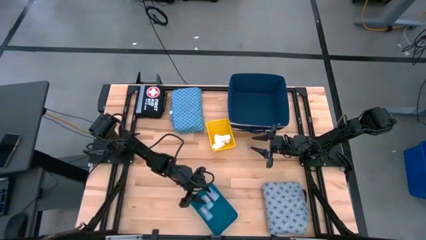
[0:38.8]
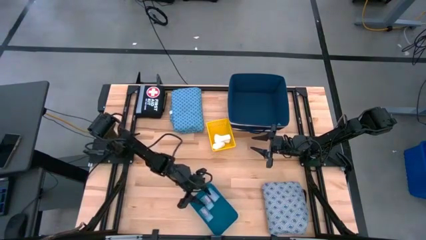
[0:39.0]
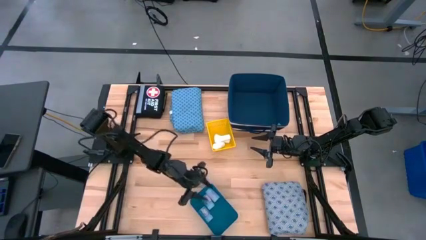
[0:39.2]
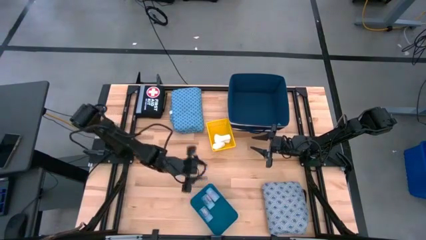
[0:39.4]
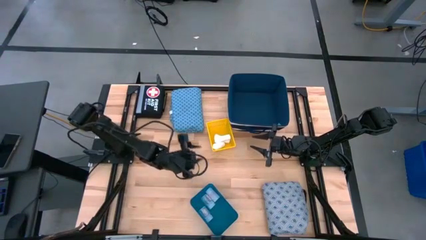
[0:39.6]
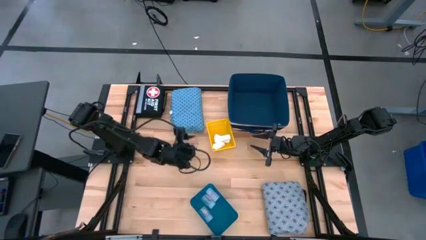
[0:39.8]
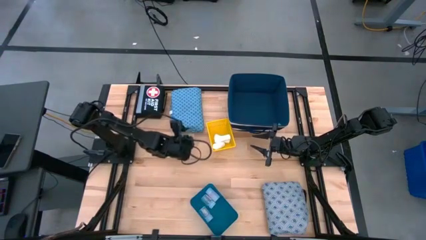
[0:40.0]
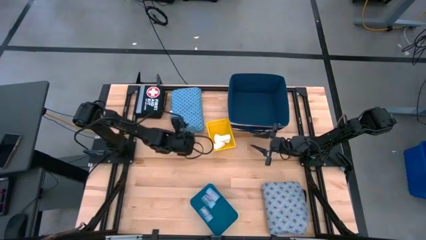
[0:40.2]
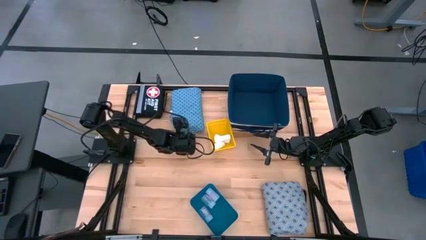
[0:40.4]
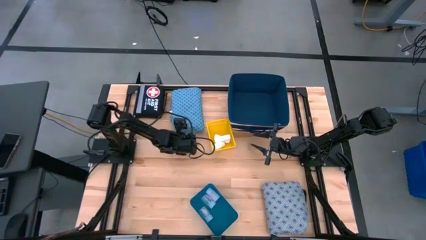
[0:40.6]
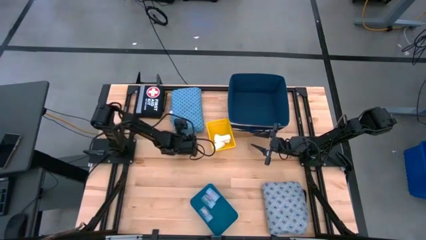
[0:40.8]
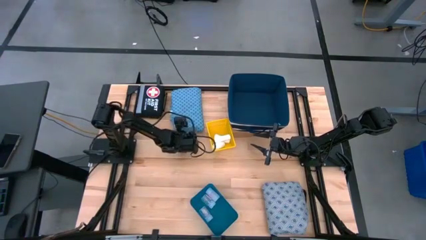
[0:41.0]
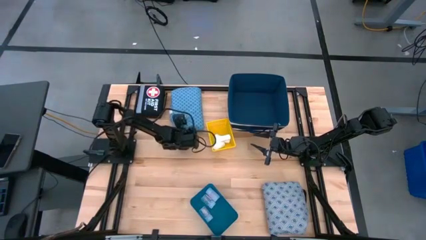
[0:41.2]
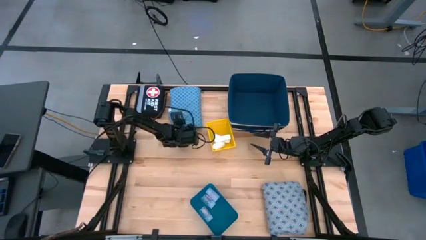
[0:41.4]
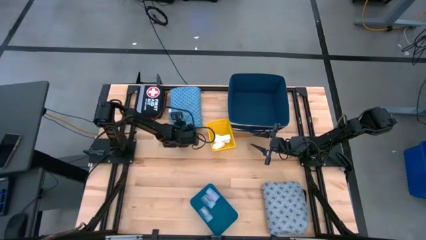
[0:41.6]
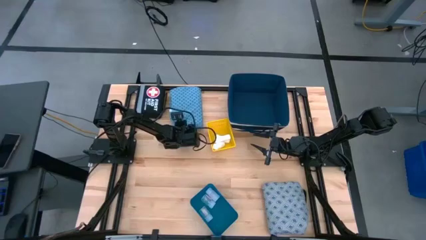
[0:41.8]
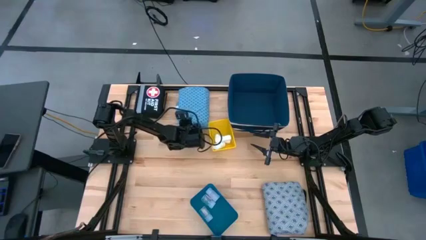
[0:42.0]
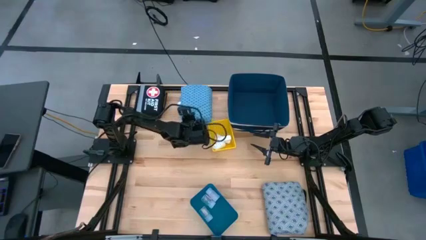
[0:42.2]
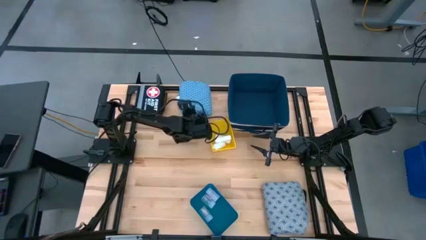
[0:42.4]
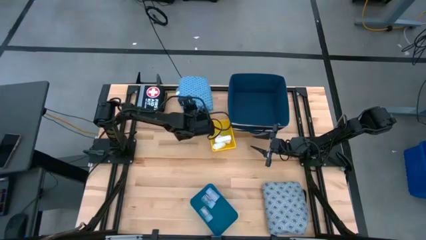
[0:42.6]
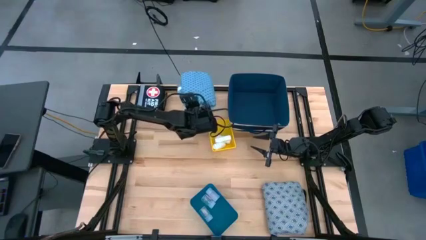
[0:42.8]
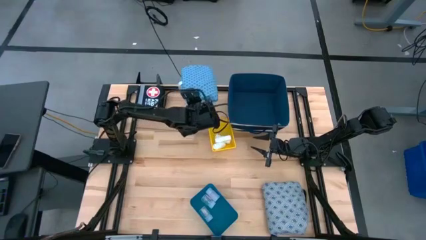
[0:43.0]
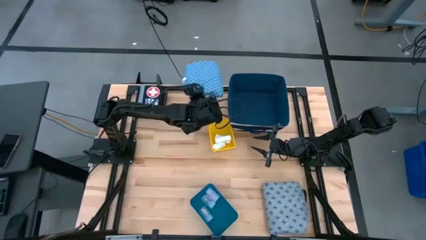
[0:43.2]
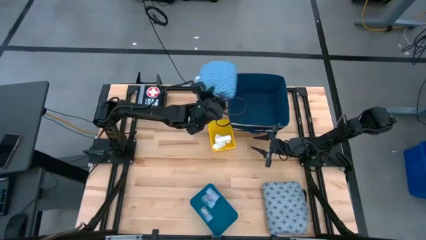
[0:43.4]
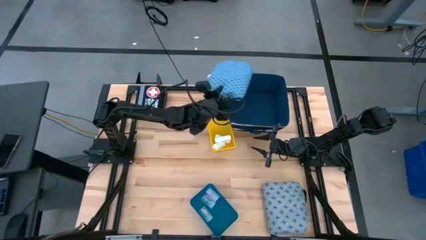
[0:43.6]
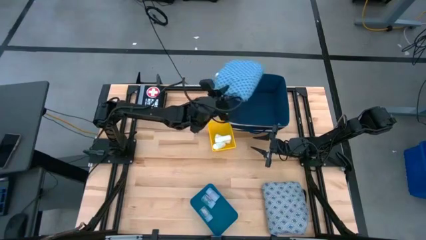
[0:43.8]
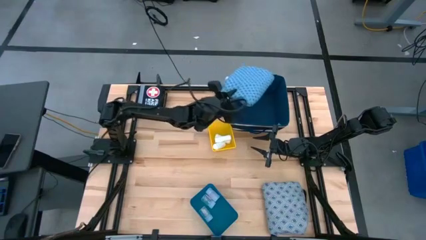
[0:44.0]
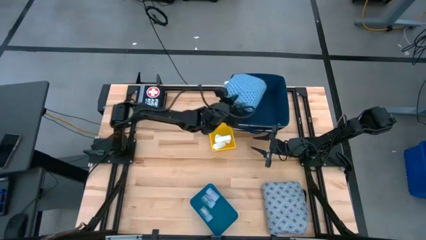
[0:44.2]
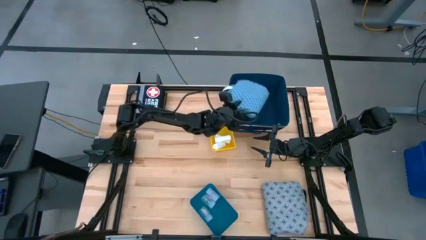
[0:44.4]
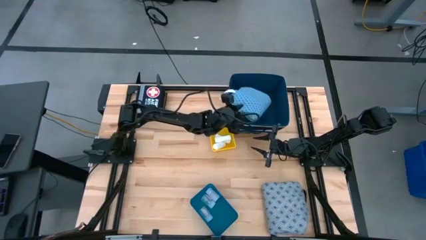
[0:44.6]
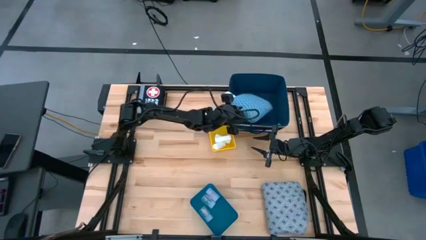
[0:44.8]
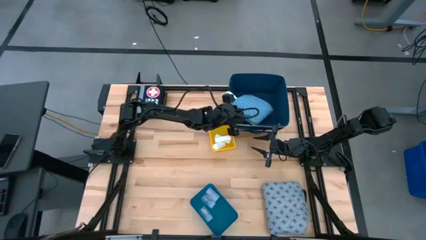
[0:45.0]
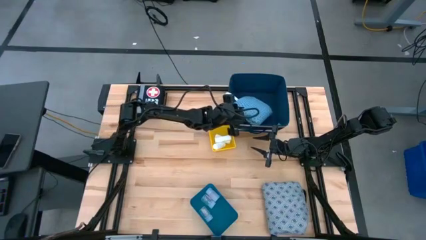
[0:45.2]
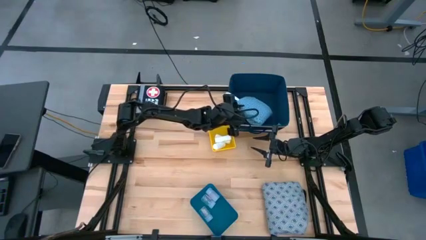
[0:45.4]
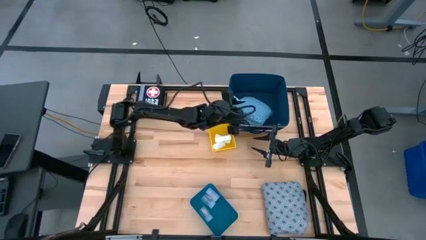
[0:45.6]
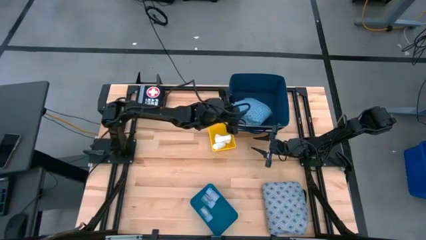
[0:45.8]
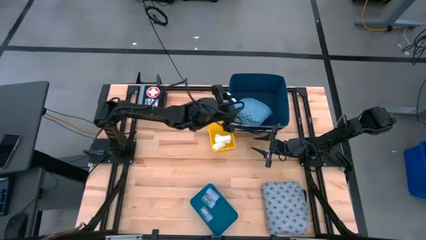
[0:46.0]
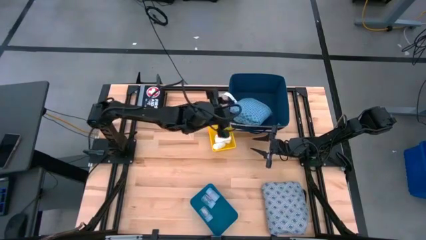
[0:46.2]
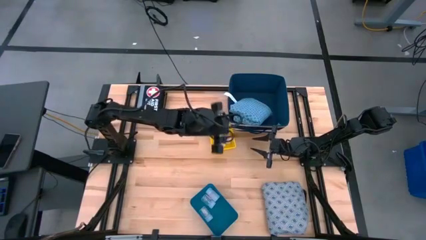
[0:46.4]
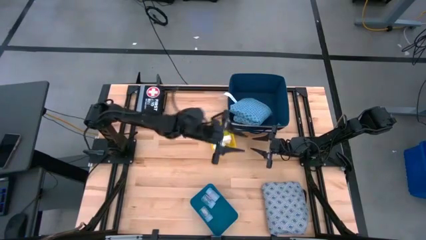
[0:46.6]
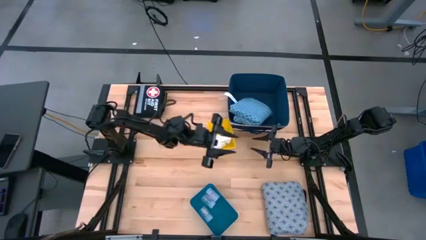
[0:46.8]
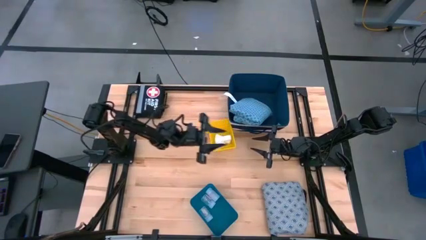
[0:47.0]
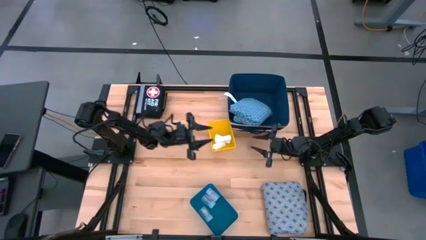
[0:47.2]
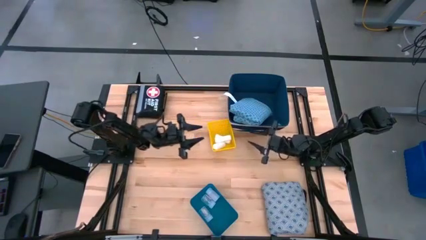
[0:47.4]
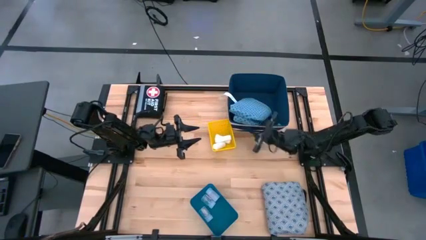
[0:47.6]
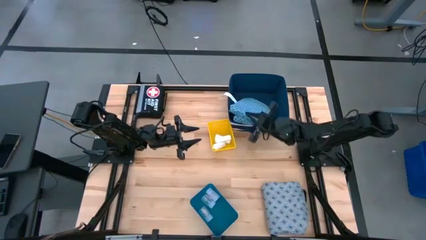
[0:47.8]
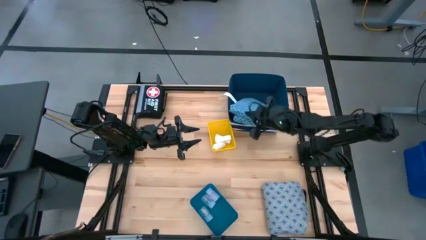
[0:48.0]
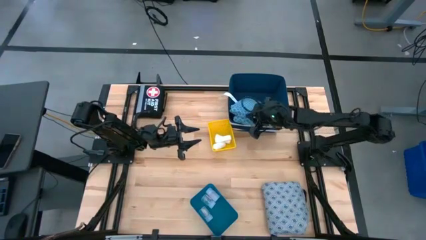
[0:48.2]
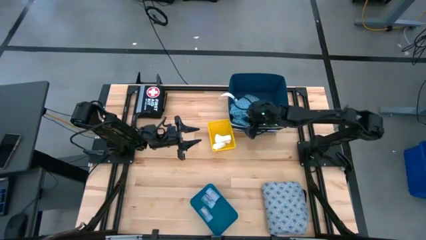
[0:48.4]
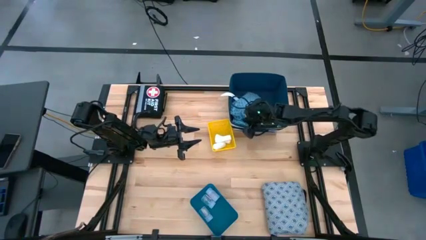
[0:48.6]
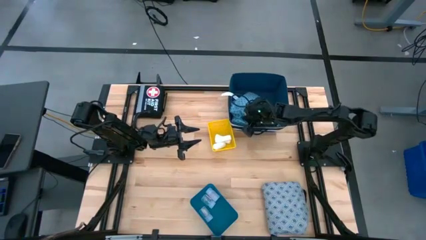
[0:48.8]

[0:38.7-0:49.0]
Task: Pick & place medical supplies in basket/bin
Put the blue patient gown into the blue and white bin

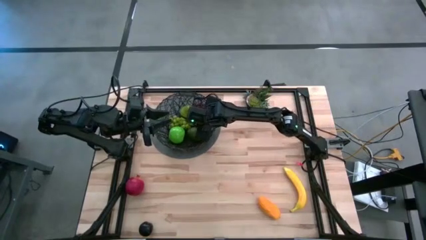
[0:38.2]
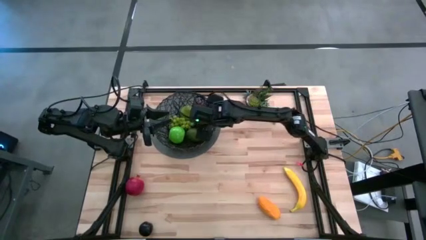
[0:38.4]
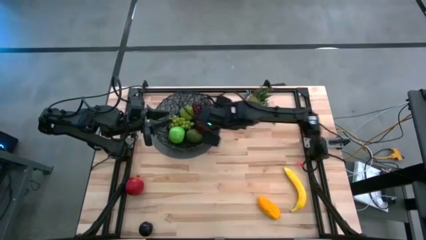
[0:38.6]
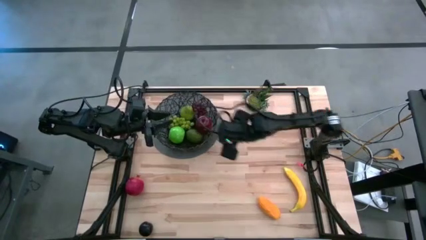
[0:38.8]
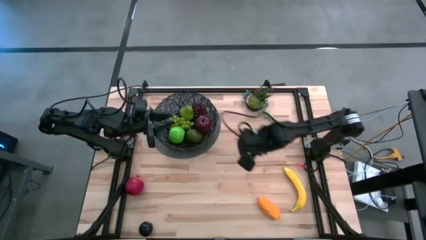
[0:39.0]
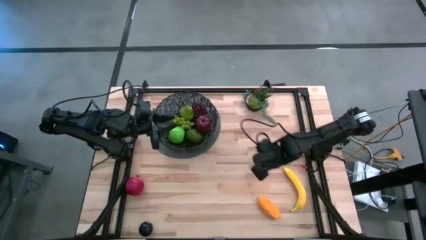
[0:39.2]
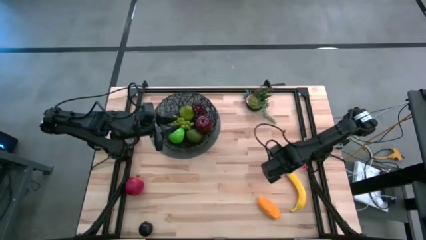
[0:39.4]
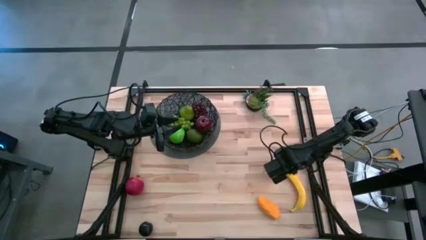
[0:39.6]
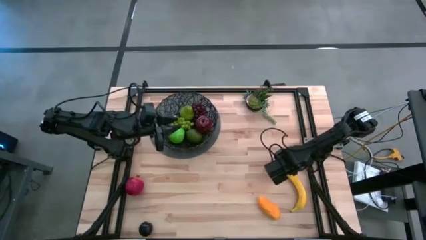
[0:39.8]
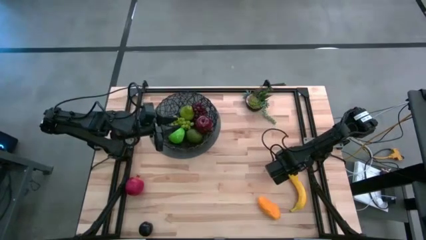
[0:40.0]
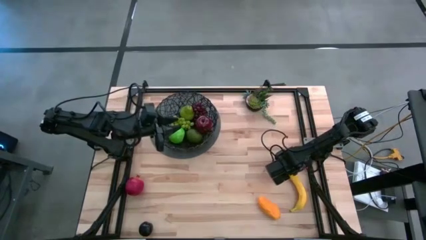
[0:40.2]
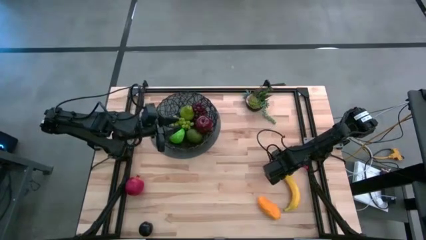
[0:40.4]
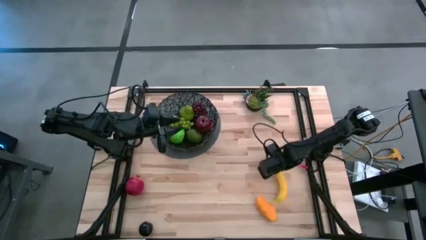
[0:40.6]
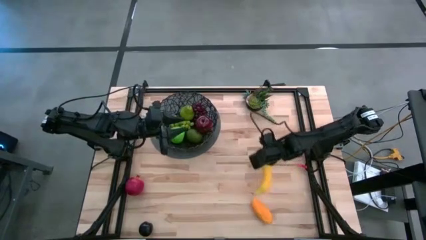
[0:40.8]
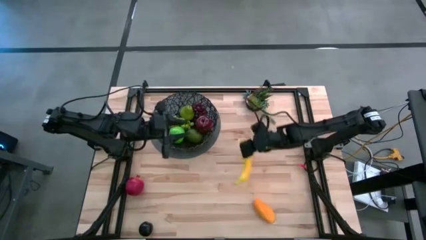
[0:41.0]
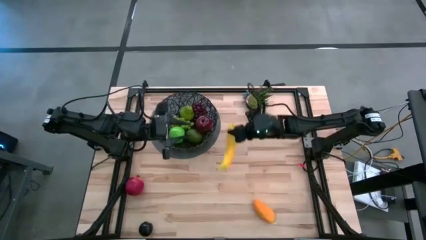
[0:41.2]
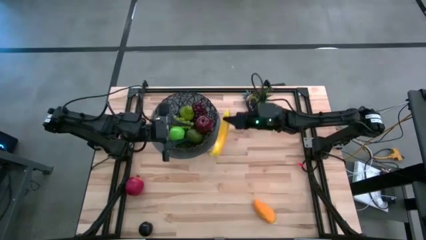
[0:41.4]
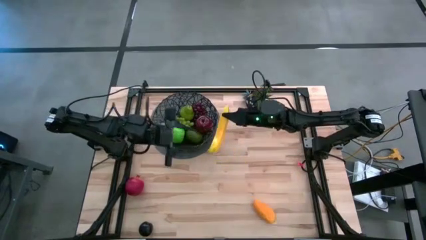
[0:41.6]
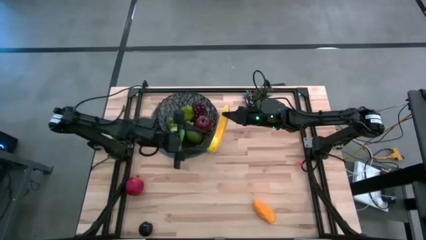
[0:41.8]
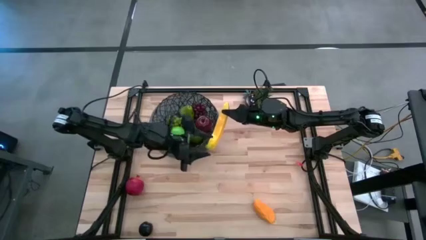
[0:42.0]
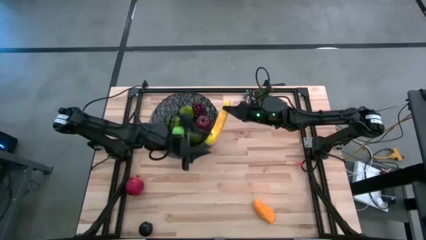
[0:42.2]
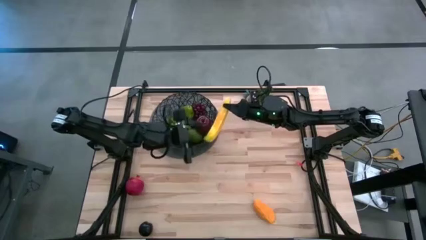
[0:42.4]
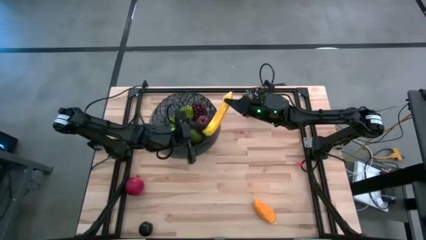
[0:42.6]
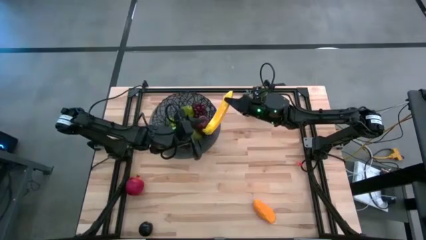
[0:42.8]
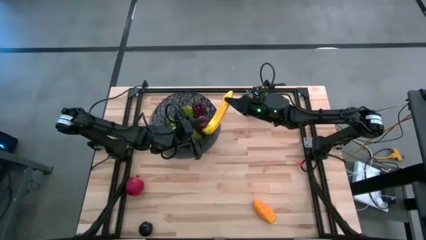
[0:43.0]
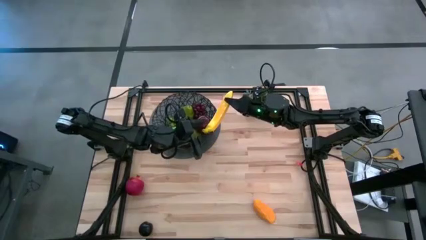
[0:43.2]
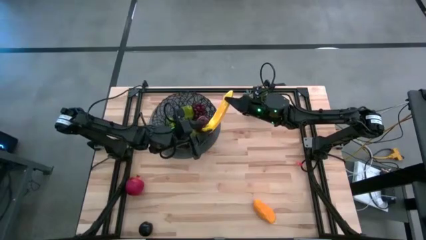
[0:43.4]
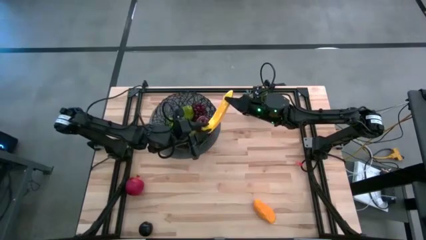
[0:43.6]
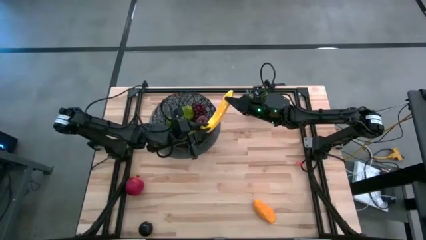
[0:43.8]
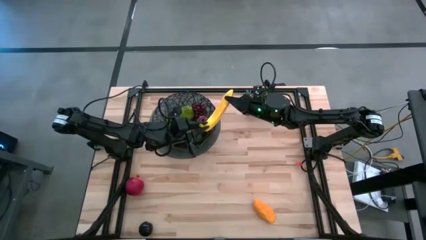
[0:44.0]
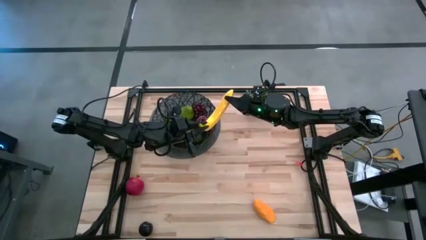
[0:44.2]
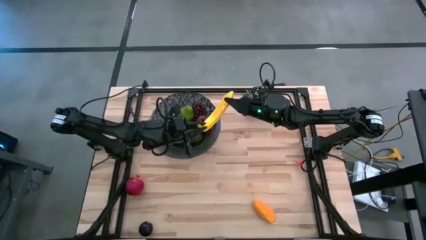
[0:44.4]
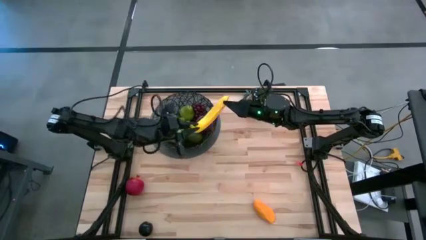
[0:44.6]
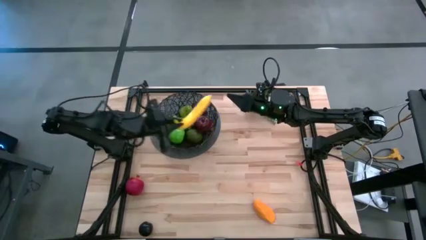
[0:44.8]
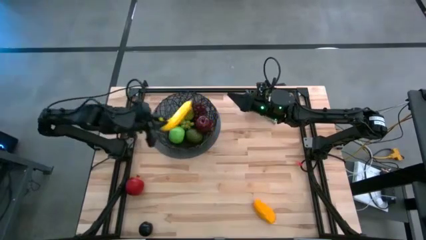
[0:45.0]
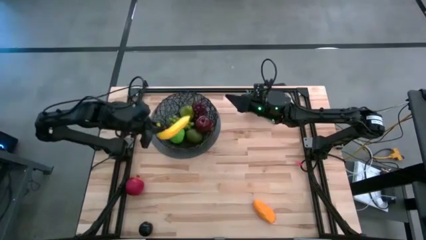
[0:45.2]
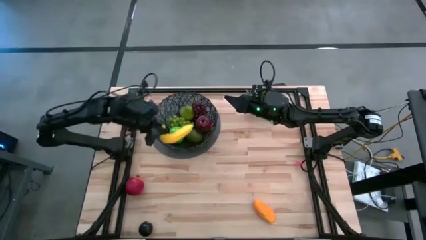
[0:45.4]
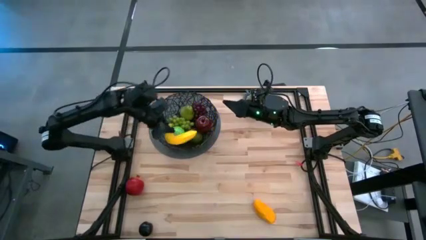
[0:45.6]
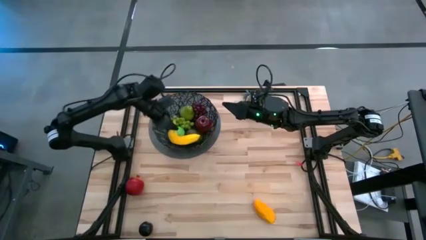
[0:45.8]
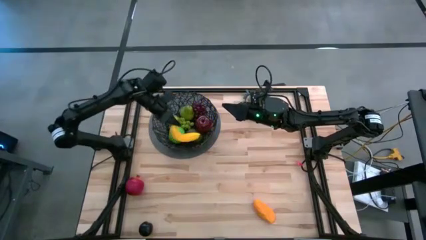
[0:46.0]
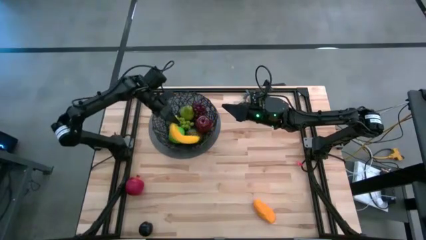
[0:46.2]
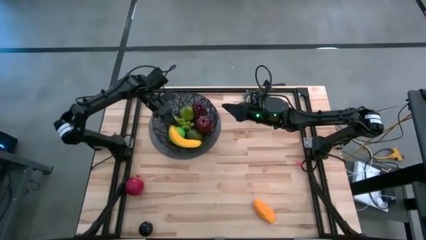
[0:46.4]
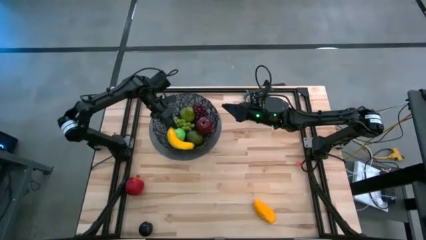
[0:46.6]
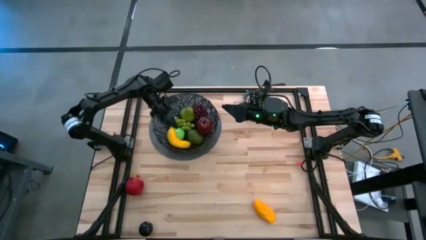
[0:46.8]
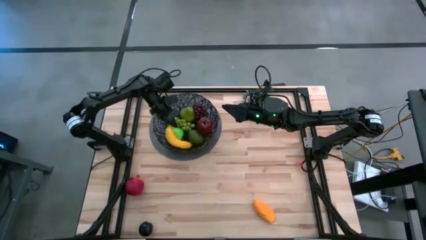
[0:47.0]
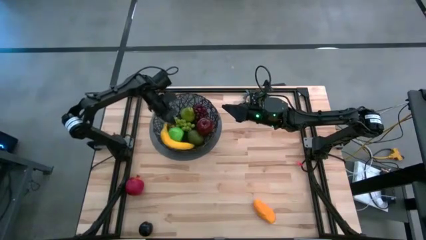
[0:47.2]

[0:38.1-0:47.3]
Task: Build produce basket
Put the yellow banana into the black wire basket
